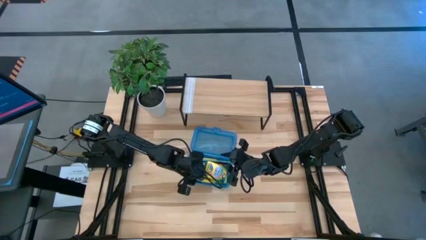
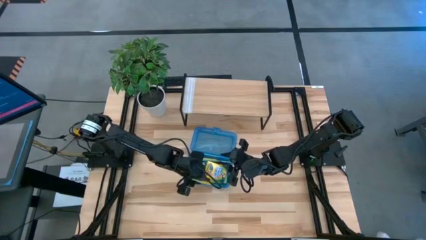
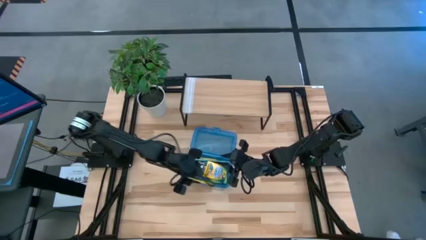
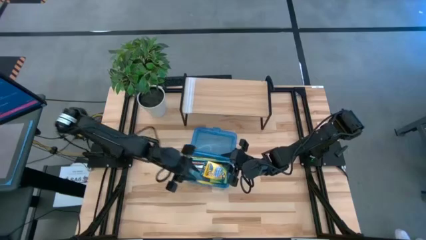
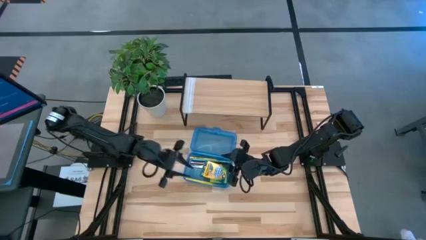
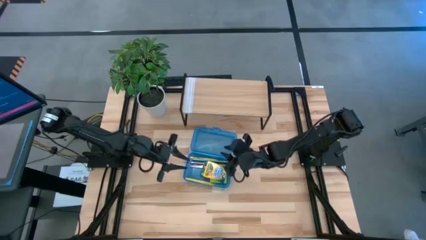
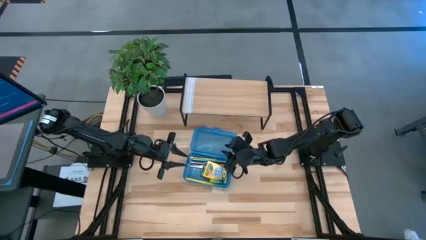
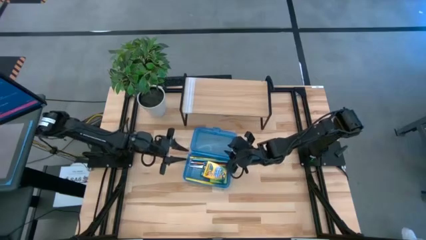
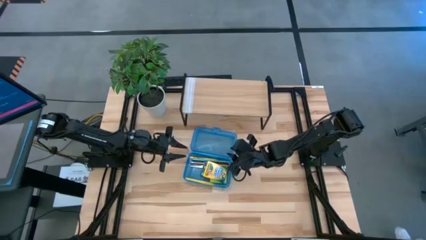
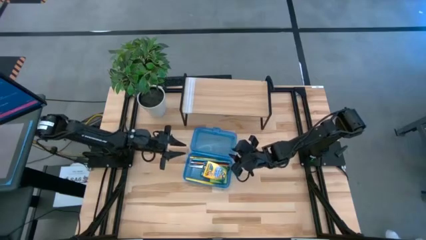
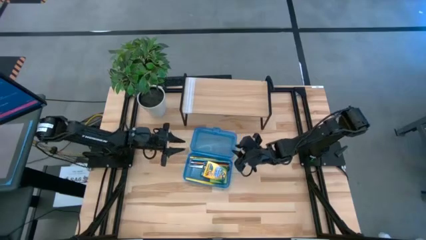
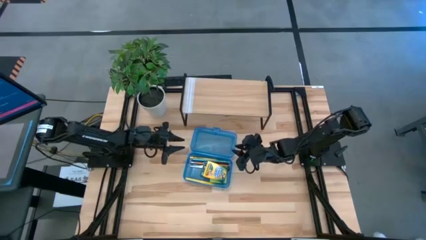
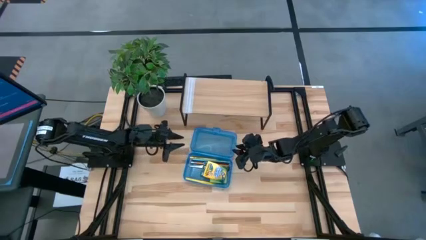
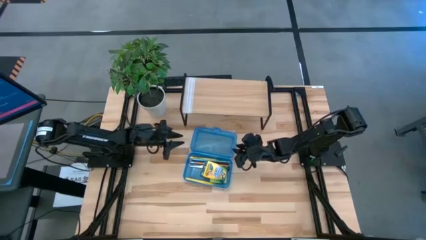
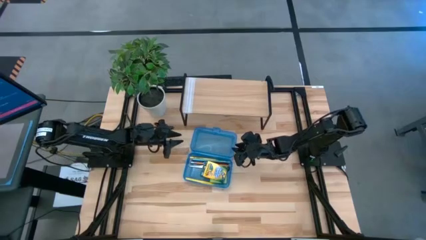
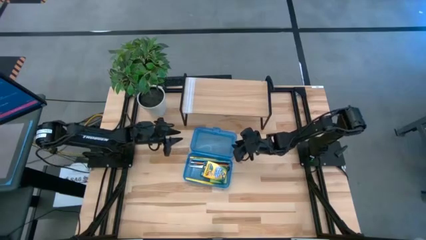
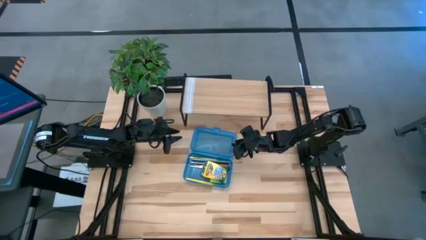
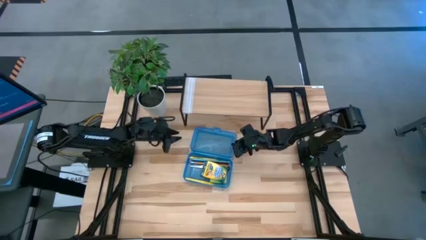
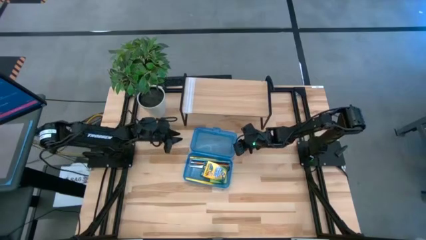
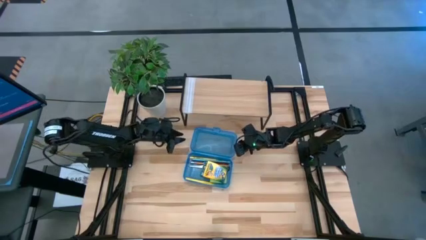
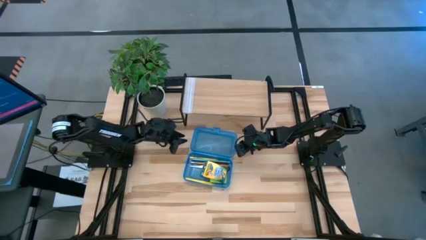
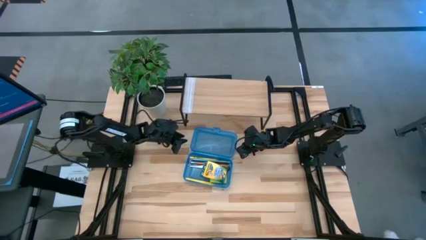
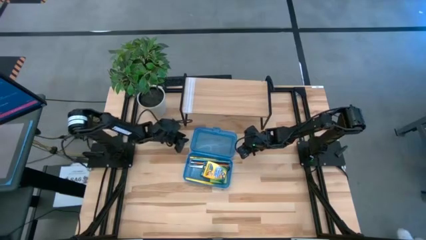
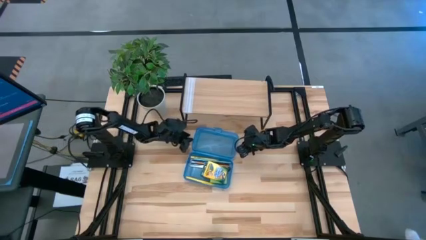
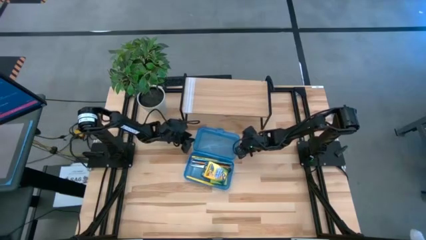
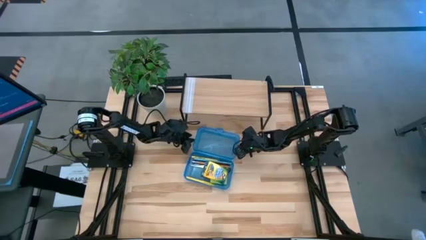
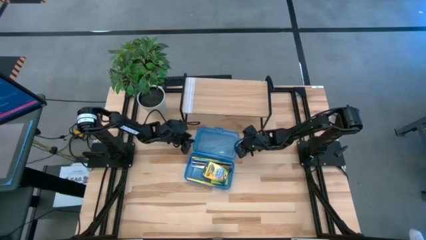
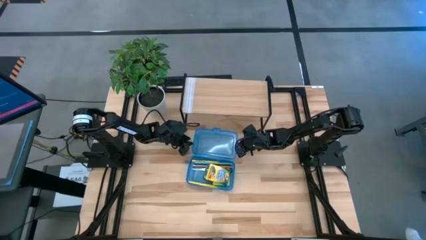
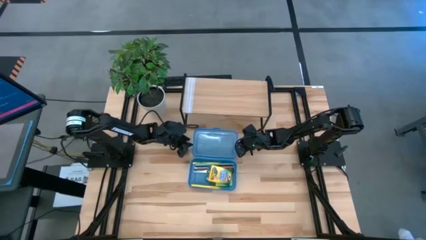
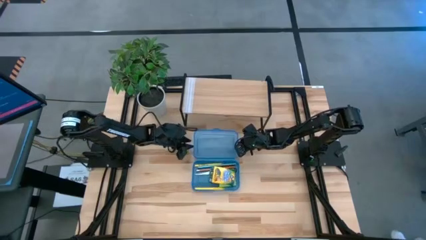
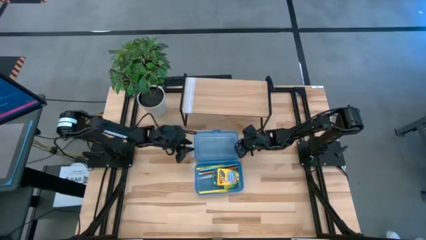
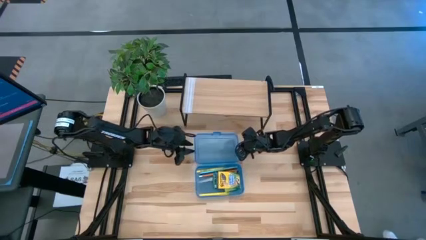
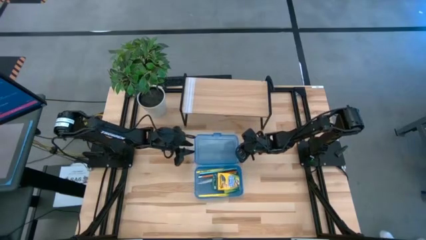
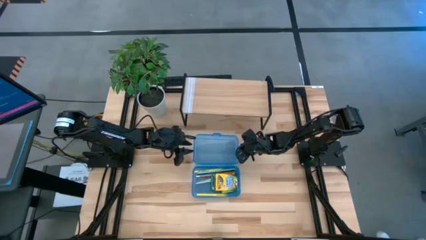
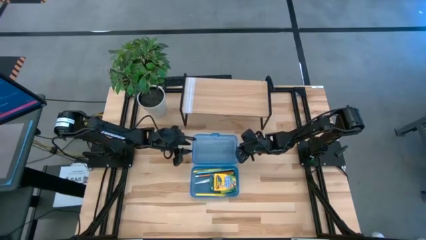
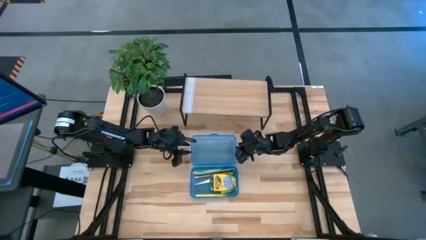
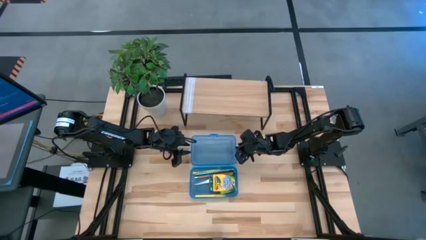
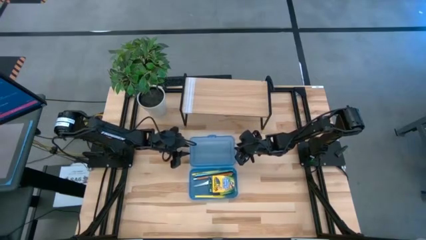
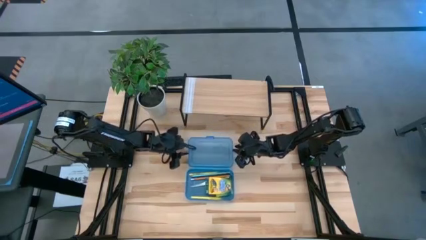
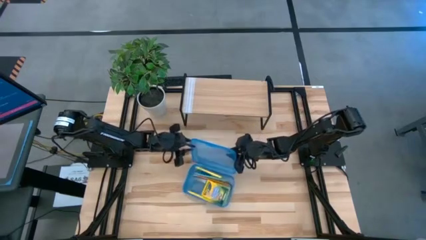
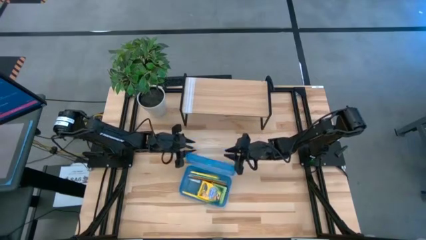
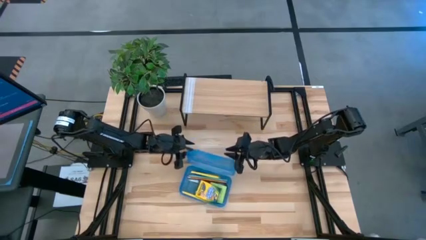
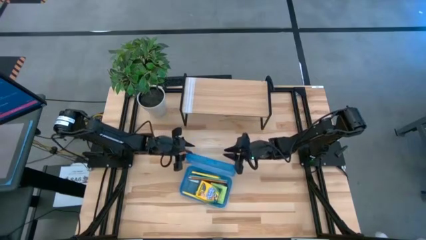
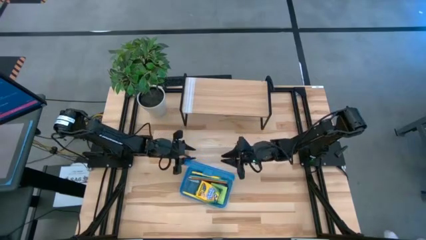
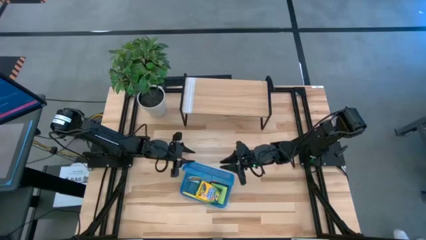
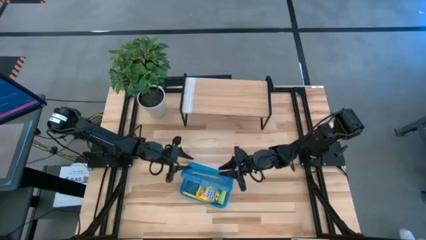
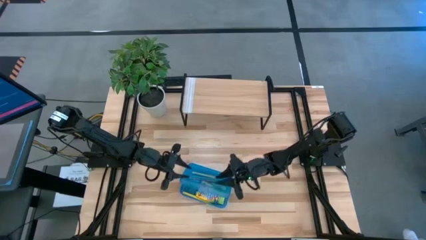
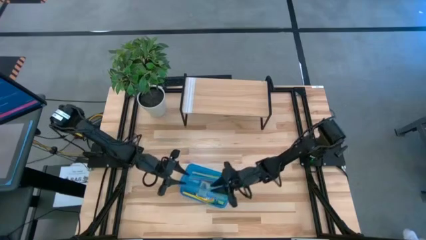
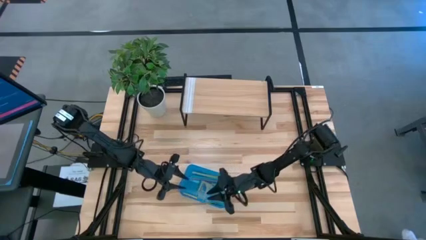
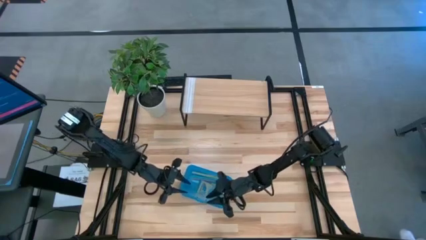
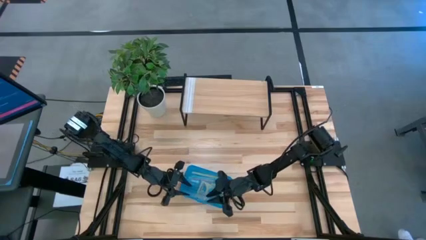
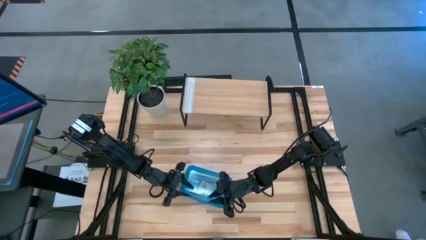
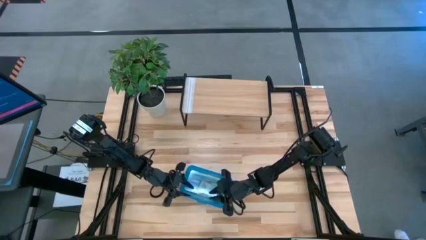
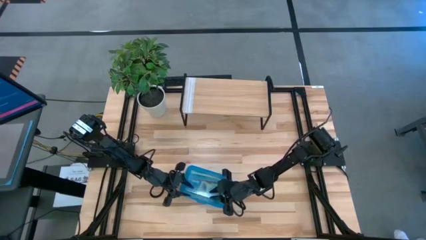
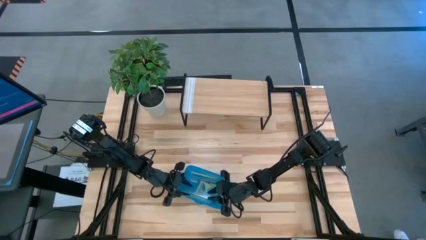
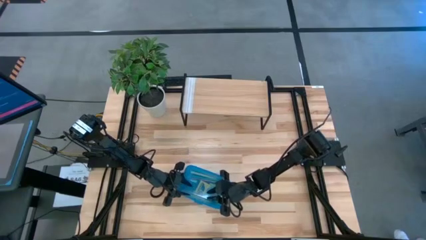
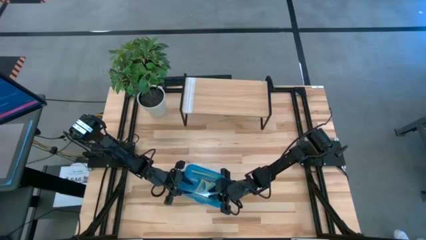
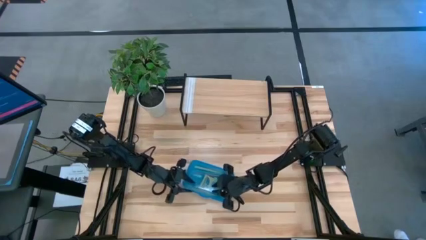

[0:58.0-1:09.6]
Task: Pack school essentials
Close the blue supply box

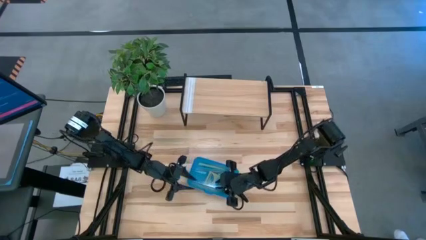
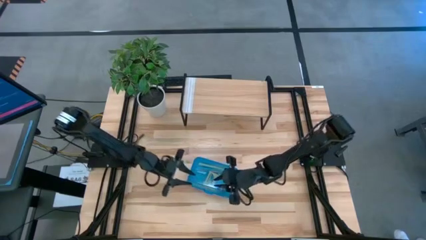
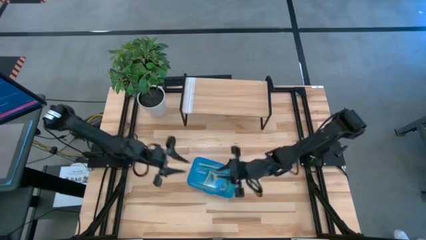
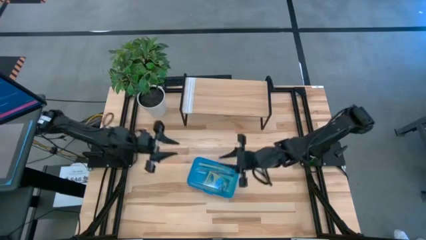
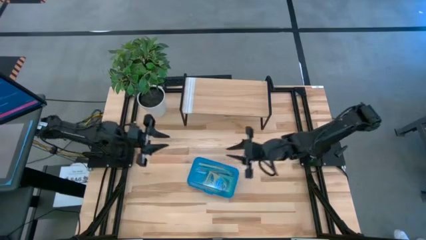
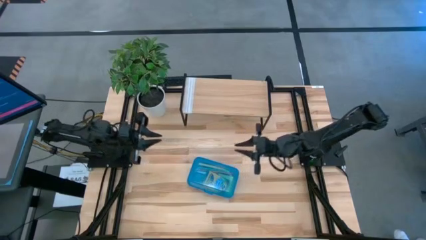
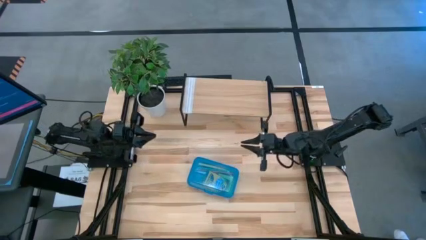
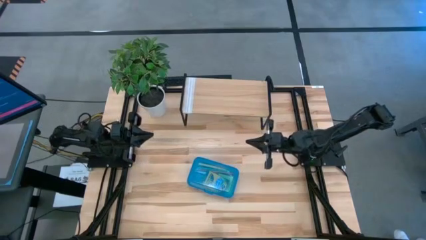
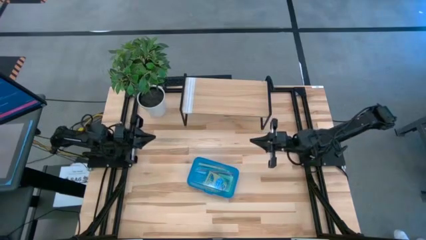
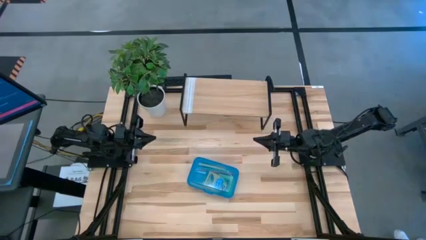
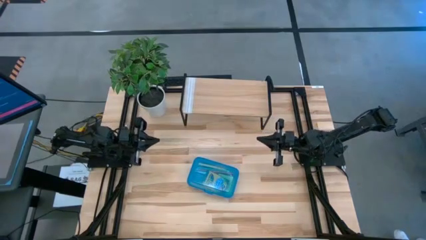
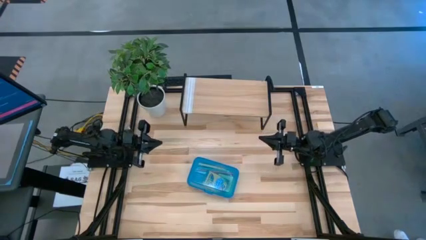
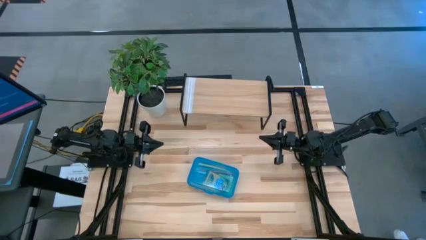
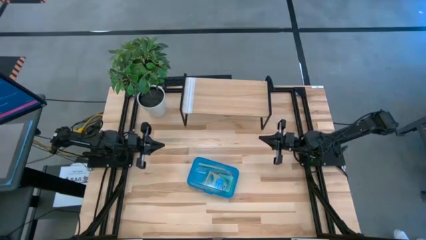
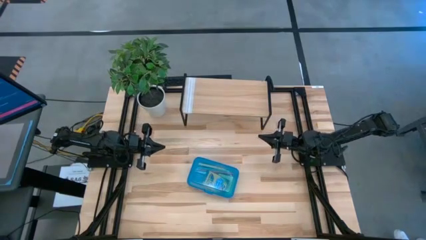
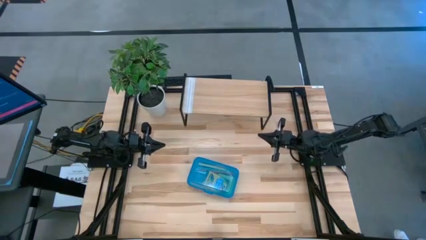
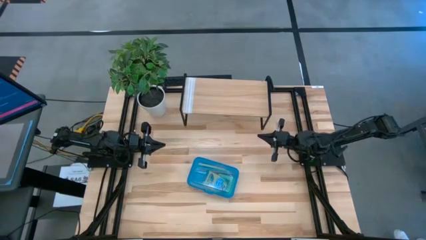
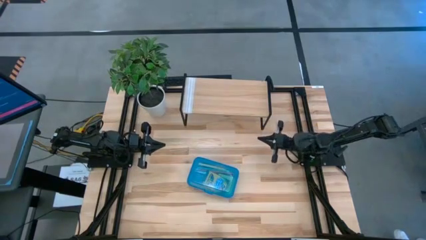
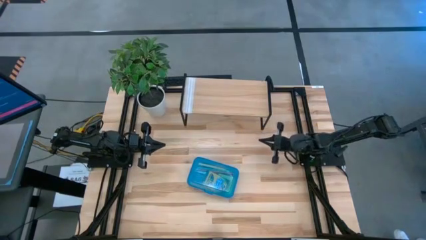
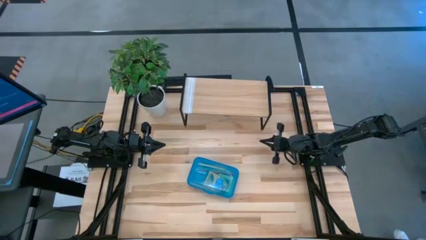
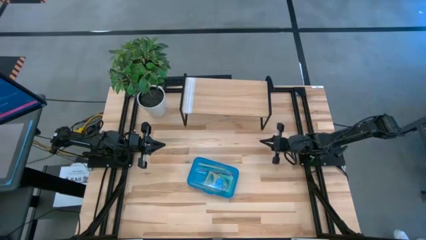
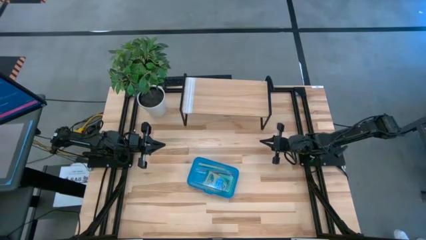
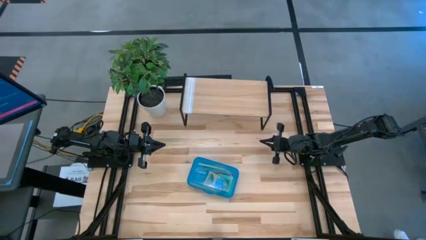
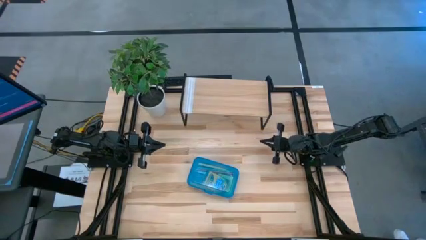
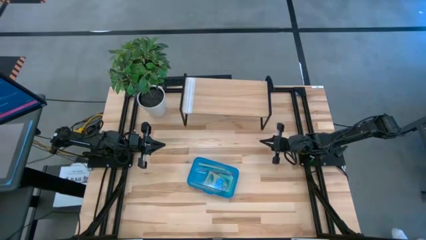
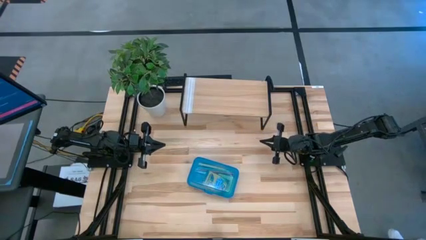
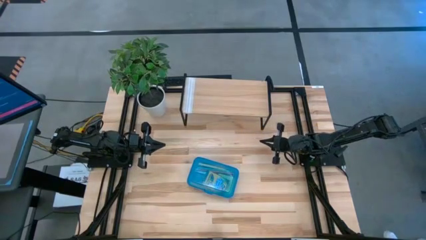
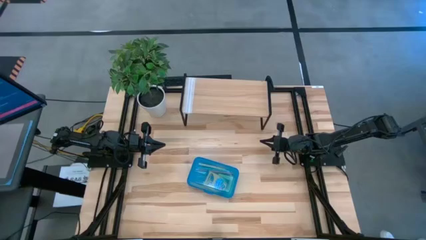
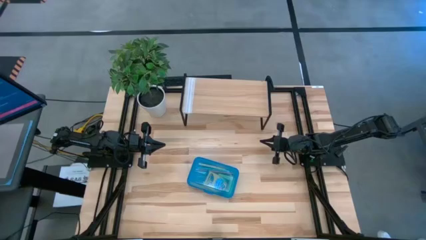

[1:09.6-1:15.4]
Return to Home Position
